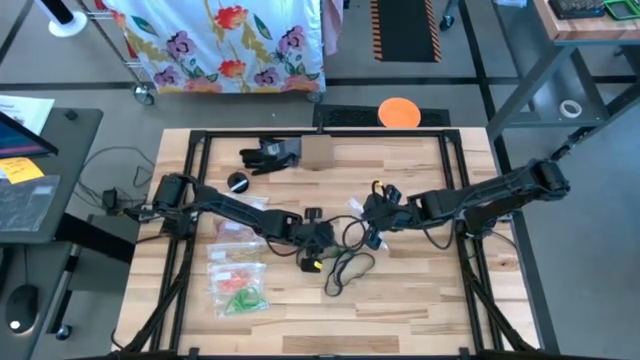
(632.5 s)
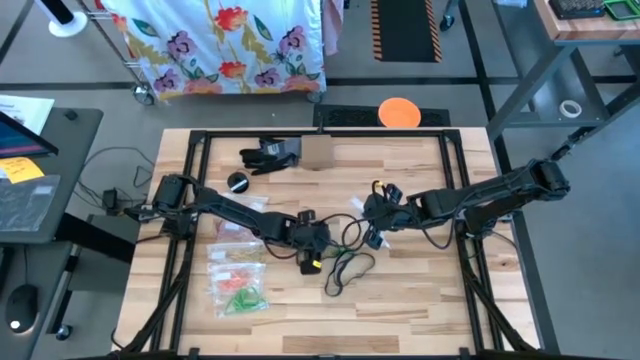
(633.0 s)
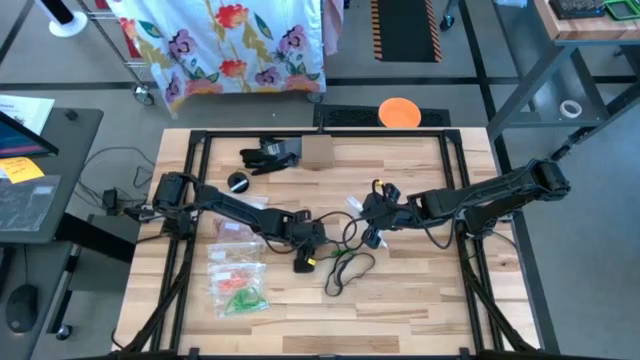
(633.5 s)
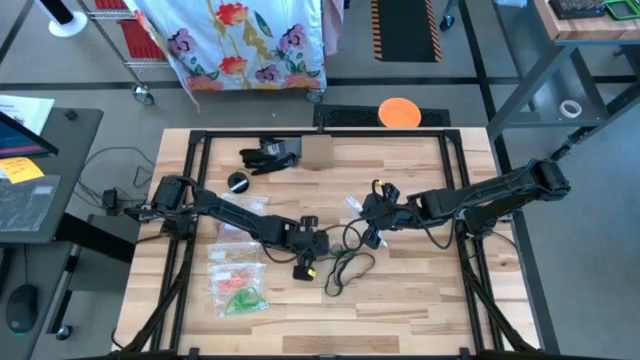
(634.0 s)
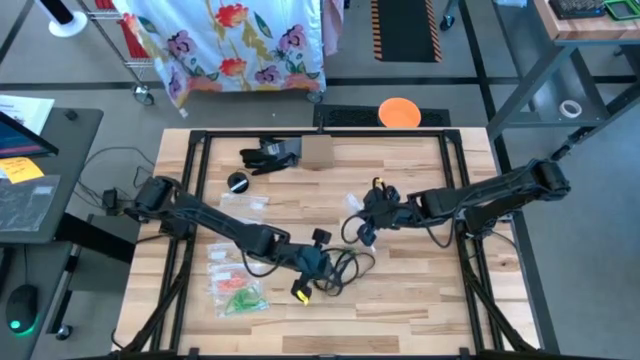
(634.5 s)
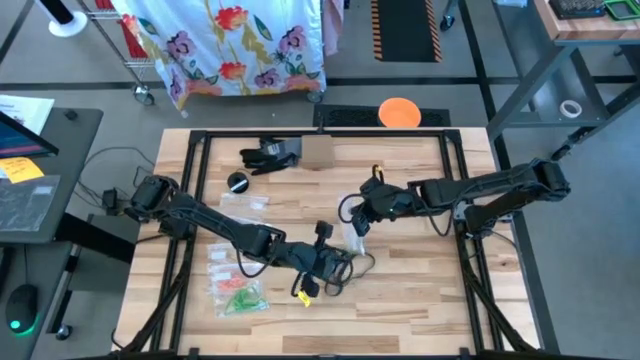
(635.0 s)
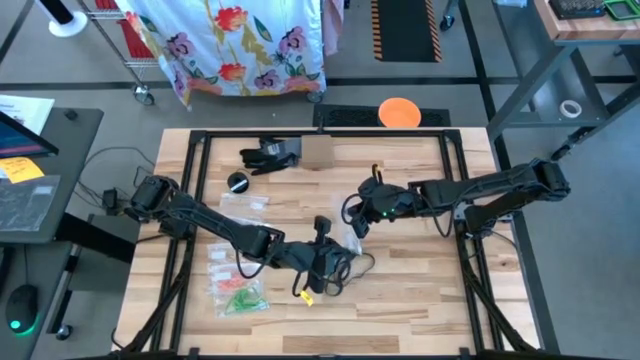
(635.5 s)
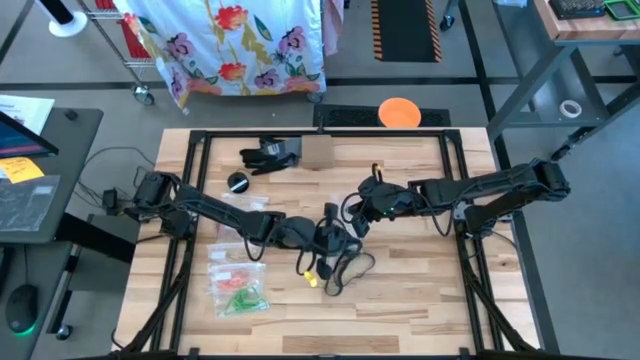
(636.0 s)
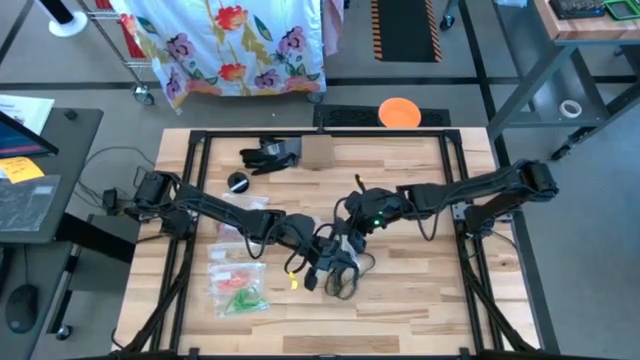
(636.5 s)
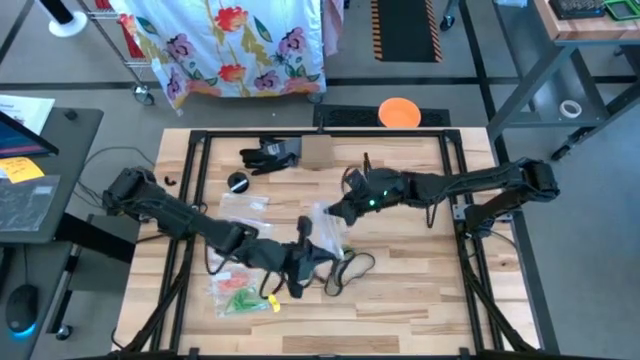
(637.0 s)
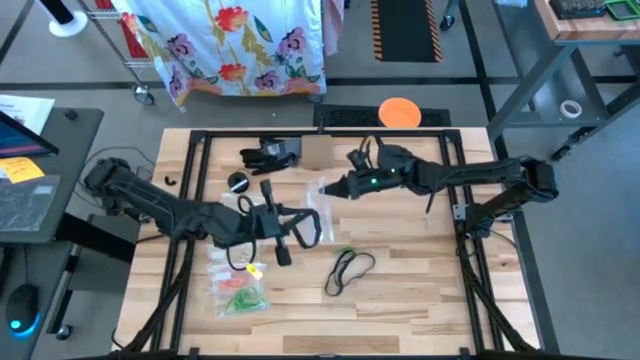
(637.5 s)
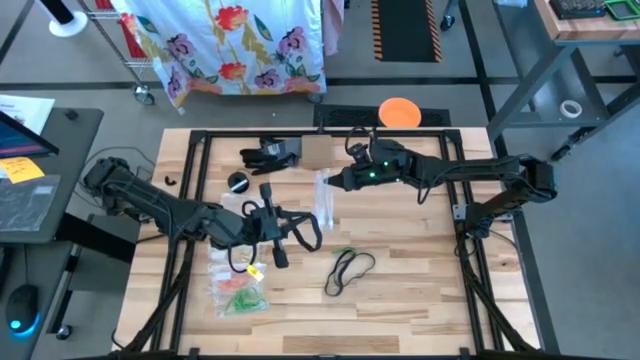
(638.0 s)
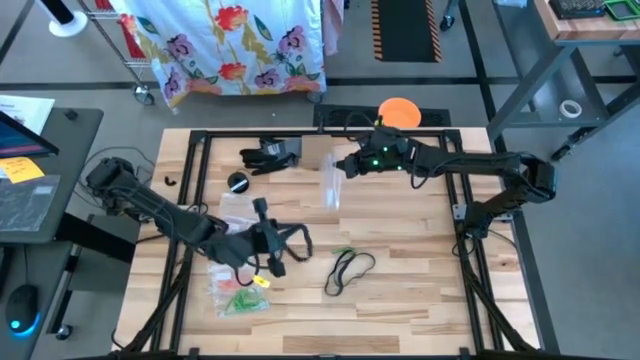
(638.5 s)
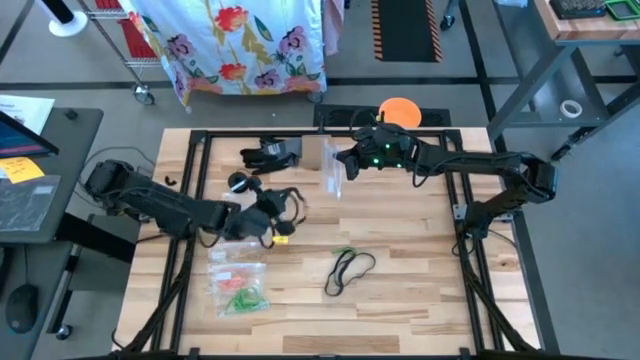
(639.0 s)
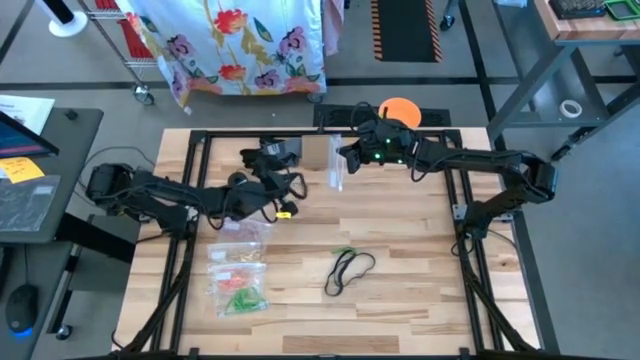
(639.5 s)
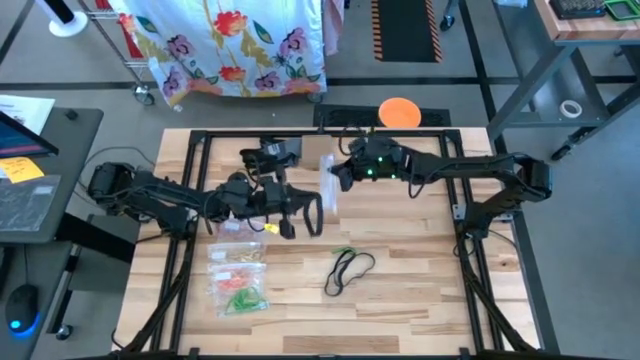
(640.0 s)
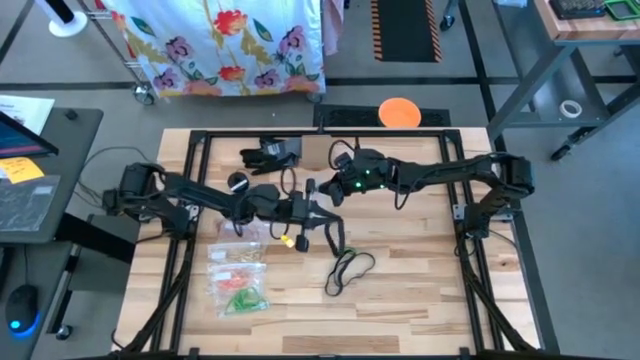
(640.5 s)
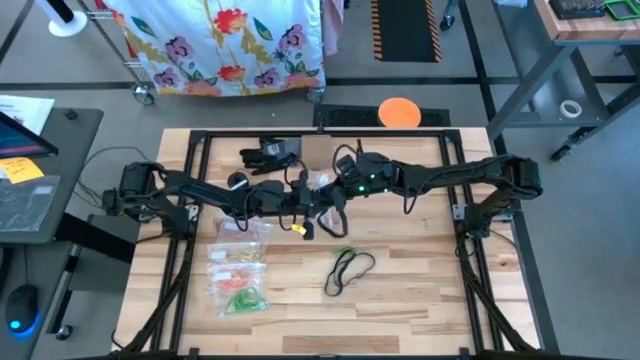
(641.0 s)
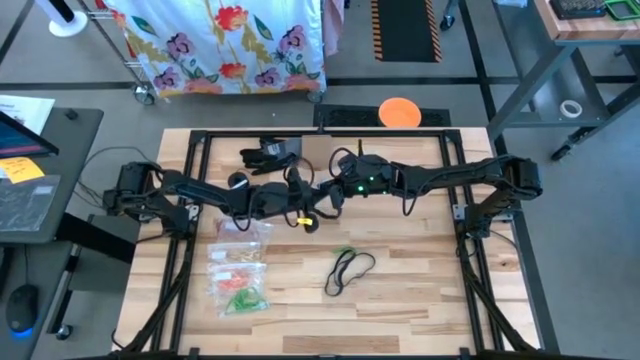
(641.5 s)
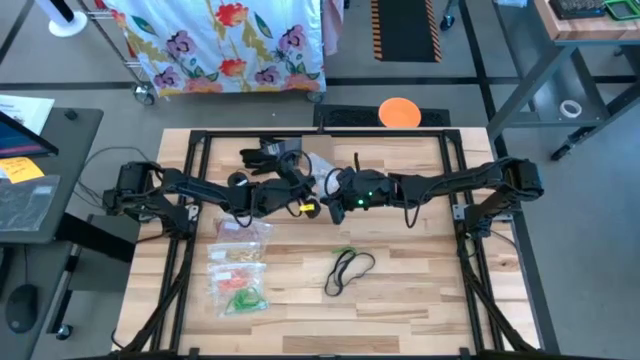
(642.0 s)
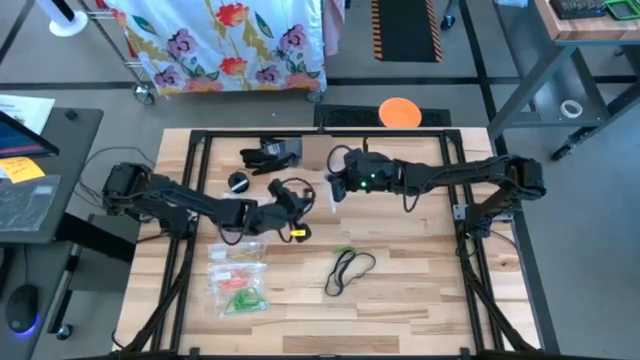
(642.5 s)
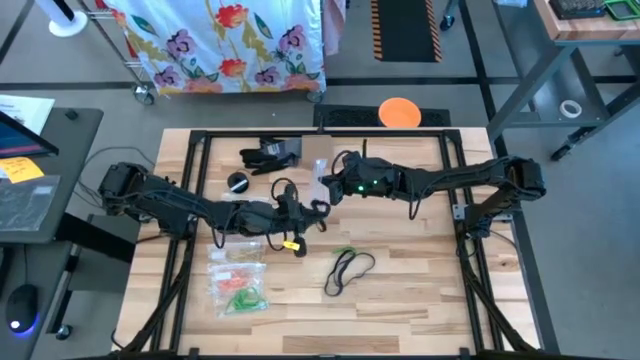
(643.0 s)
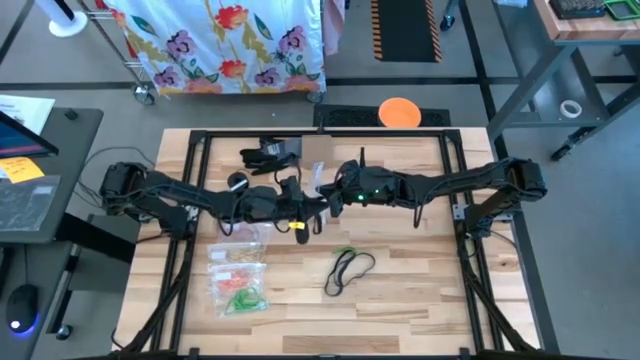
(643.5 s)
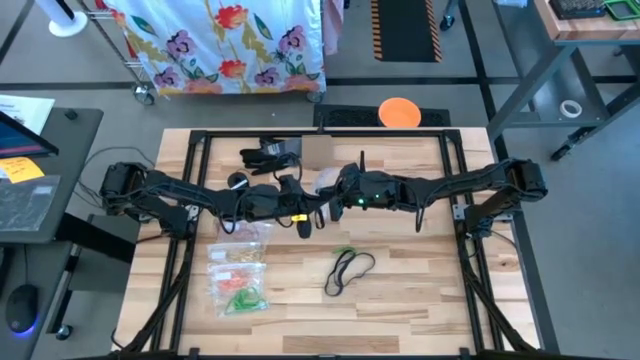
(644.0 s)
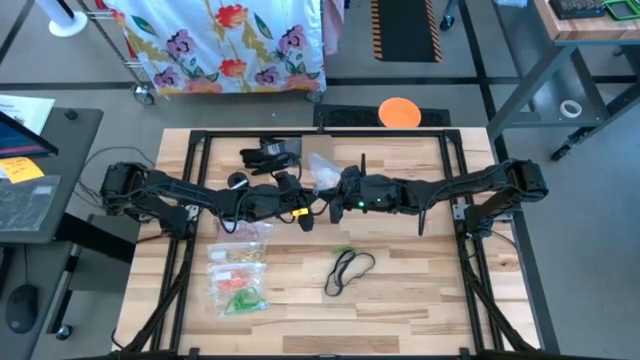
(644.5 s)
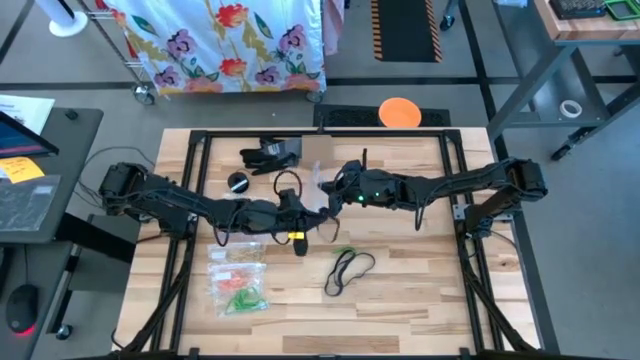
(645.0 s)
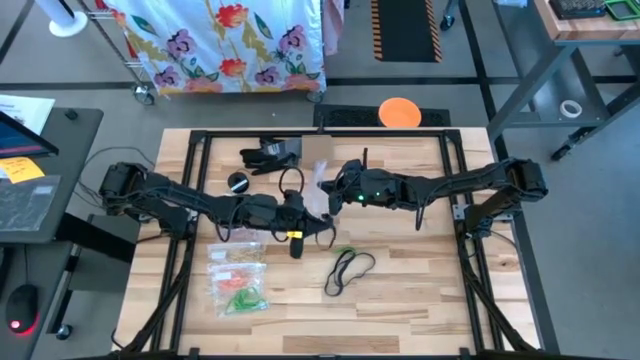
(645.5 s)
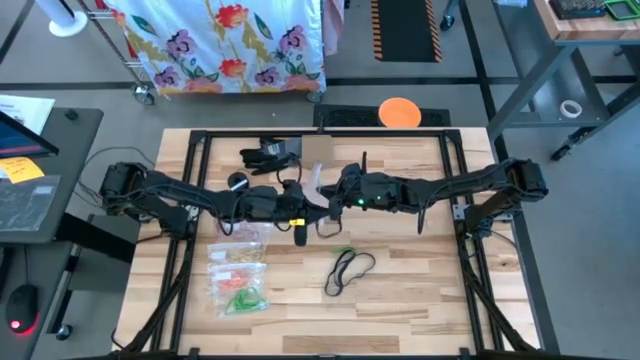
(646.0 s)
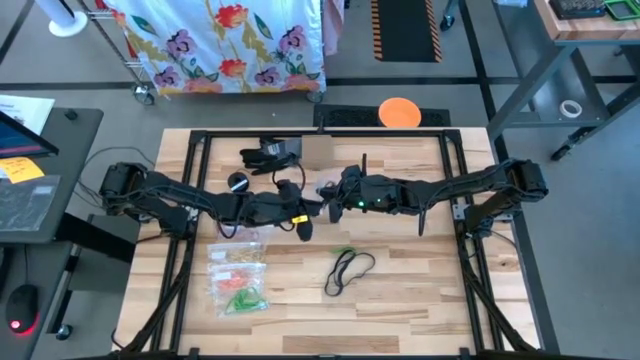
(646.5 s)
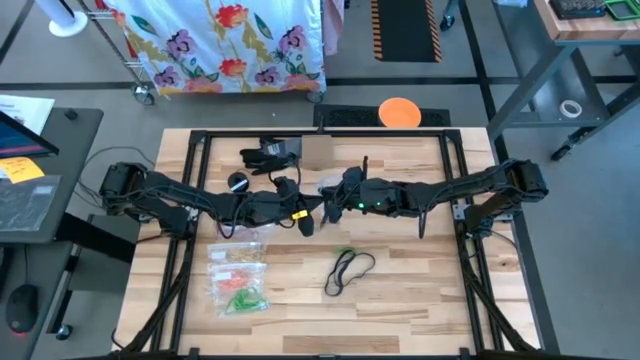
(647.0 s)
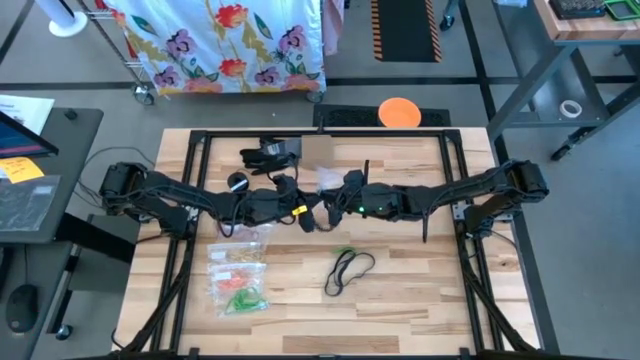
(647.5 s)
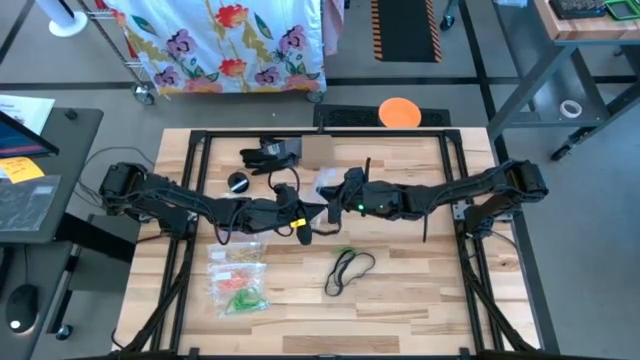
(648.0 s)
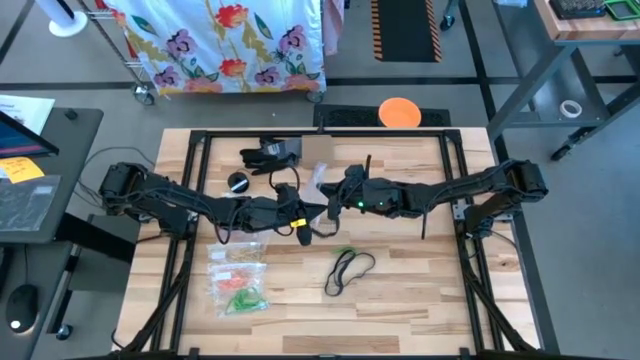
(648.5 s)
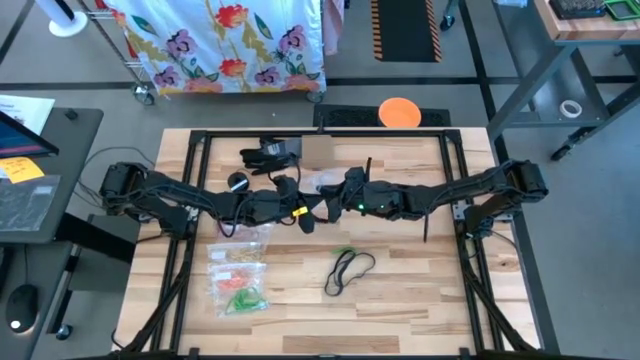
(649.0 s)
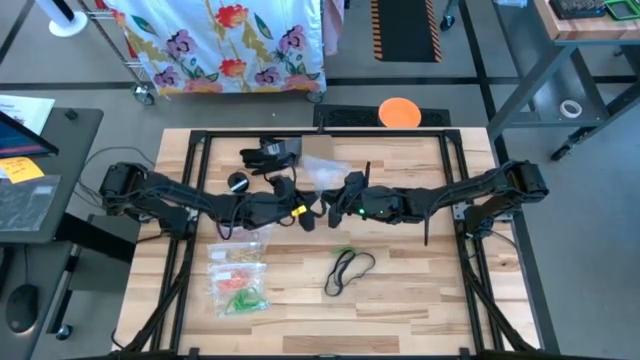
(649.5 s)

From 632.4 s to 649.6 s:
Task: Sort rubber bands
Put the black rubber band into the transparent zip bag

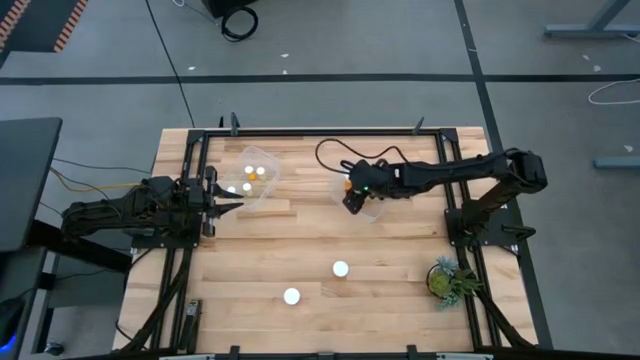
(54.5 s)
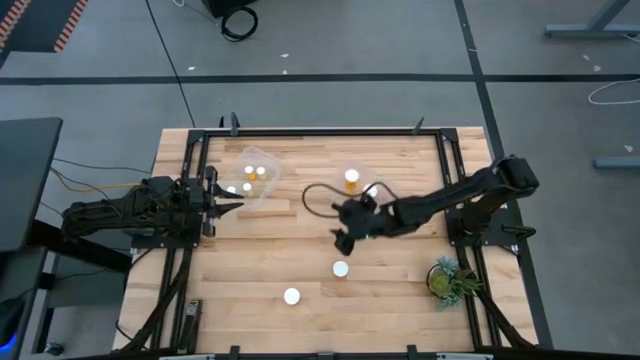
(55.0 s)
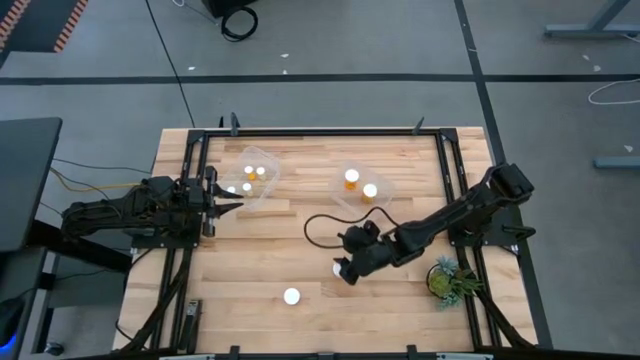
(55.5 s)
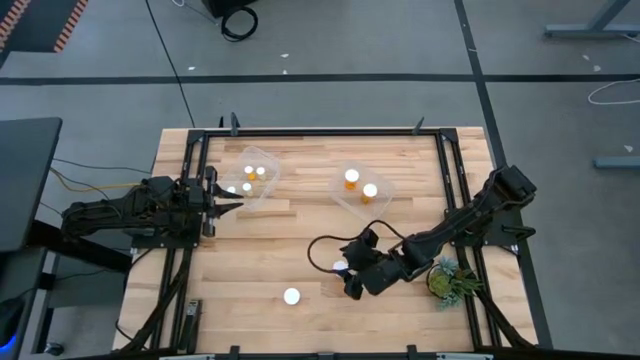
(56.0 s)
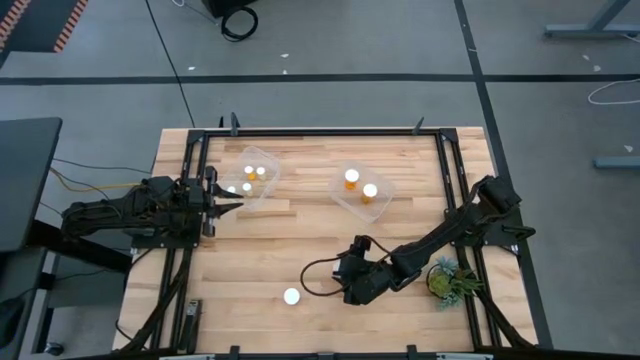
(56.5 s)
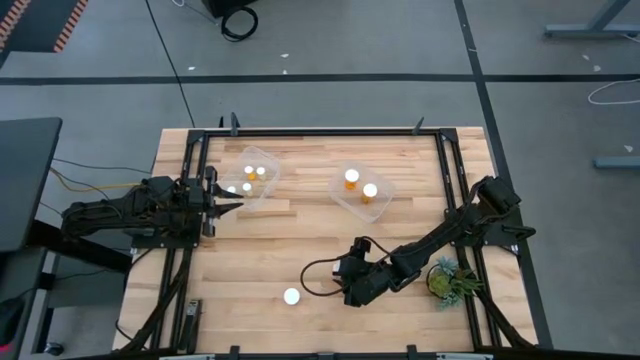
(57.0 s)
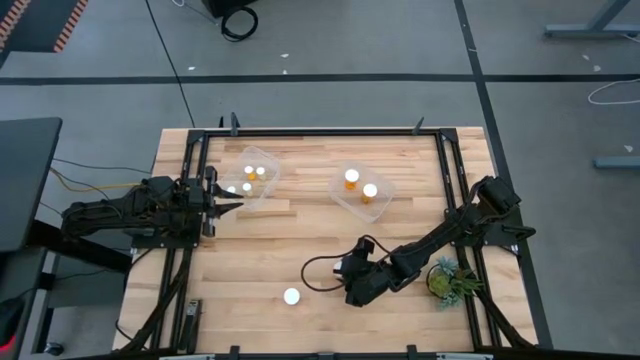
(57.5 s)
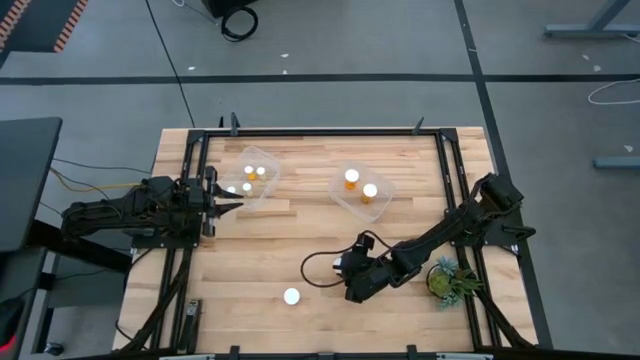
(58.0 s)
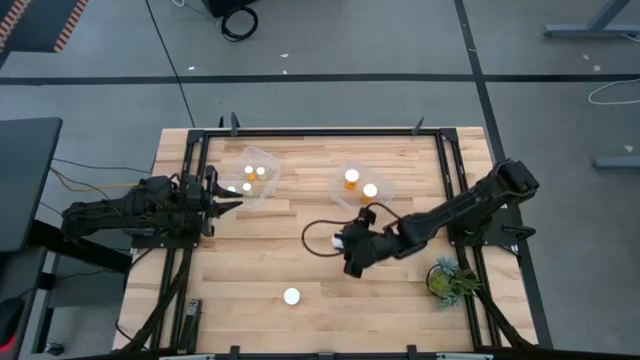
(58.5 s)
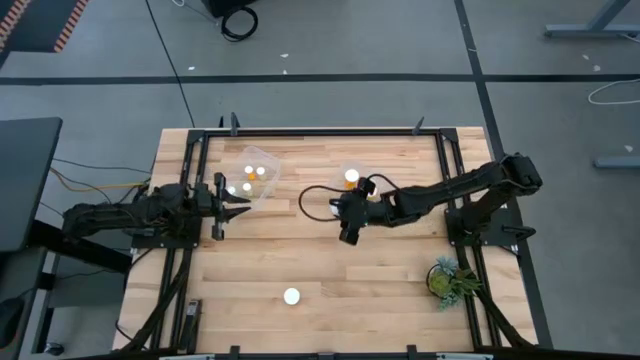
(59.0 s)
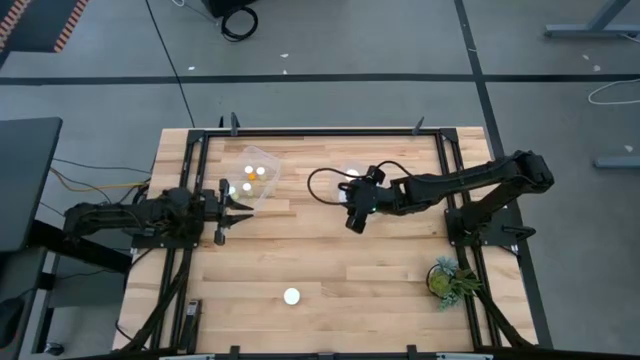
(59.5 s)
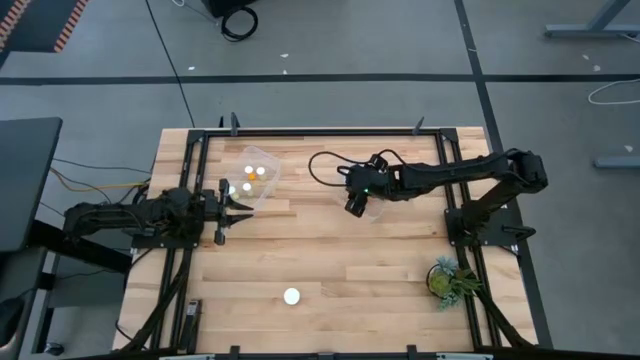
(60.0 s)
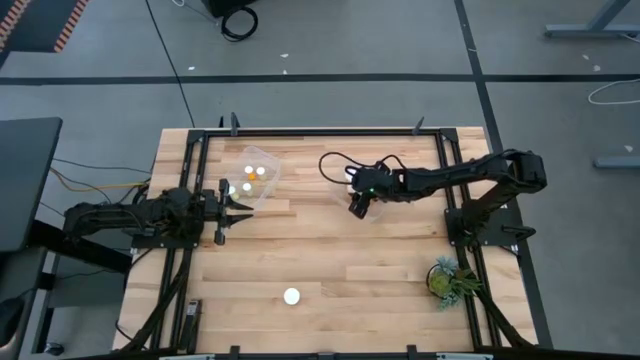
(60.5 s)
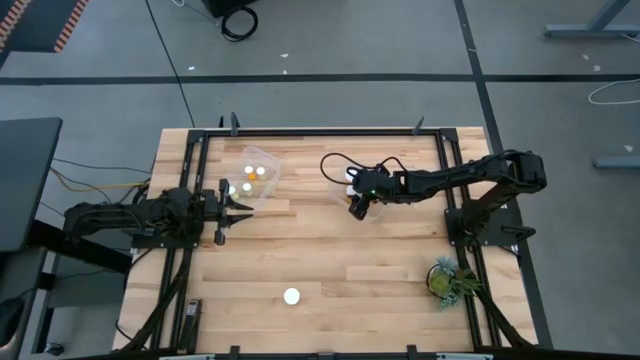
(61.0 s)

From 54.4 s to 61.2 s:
Task: Pick and place medicine bottles into bin by pill shape (circle, oval)
Put the big orange pill bottle into the right transparent bin
